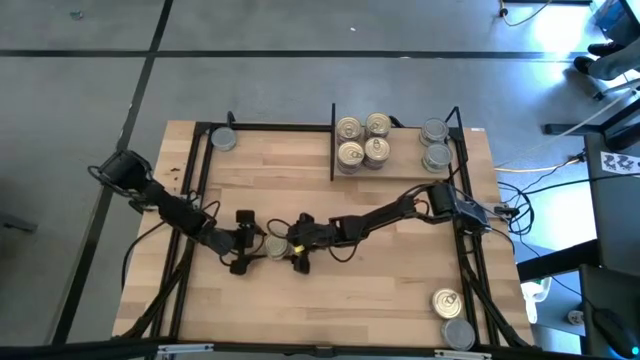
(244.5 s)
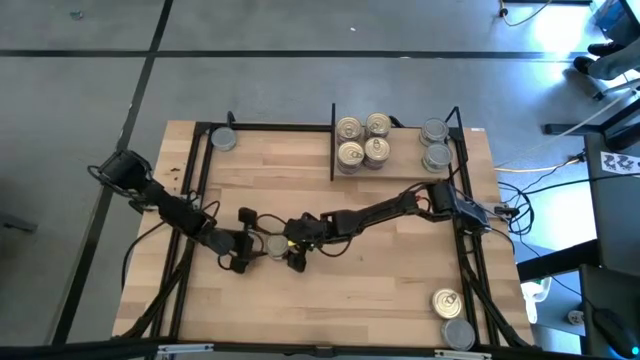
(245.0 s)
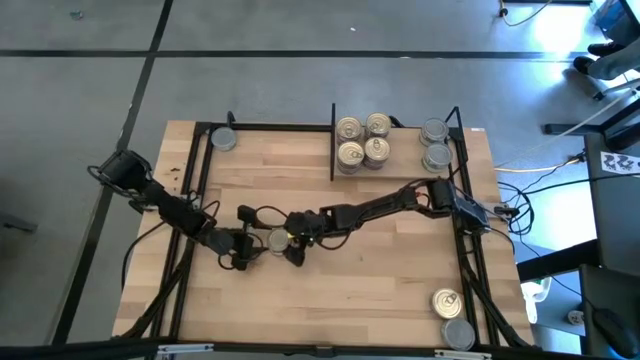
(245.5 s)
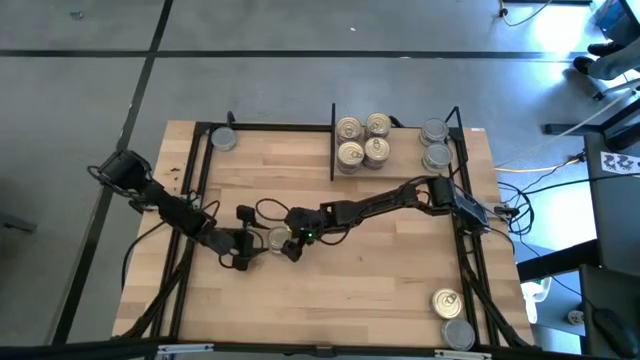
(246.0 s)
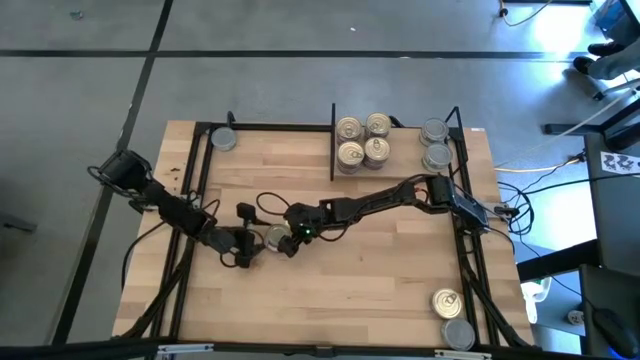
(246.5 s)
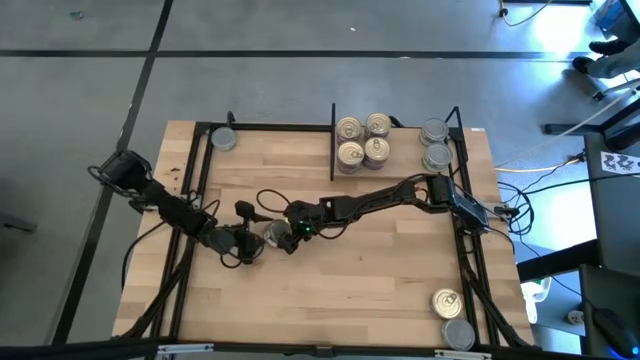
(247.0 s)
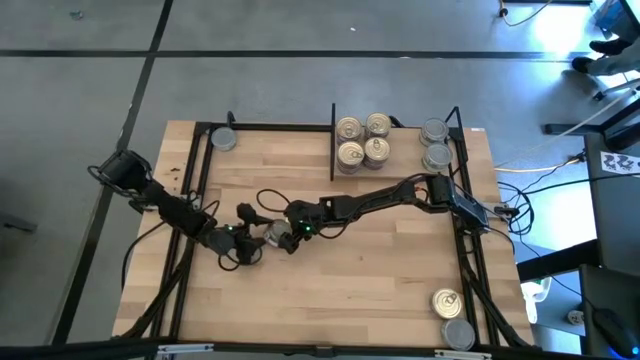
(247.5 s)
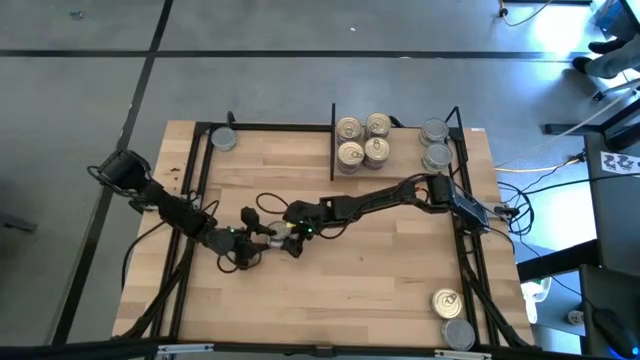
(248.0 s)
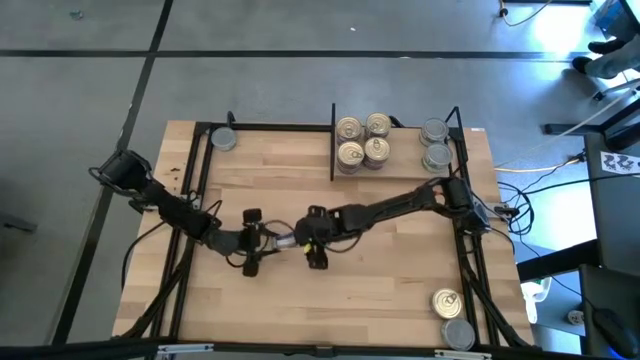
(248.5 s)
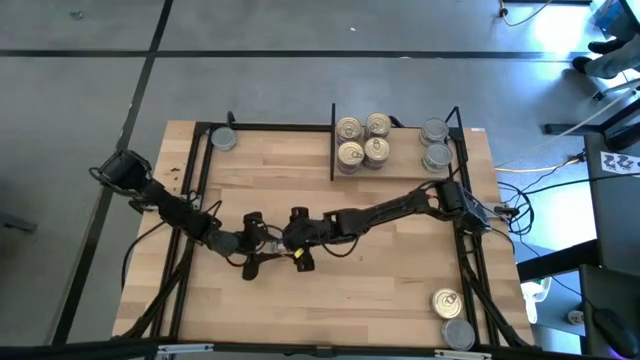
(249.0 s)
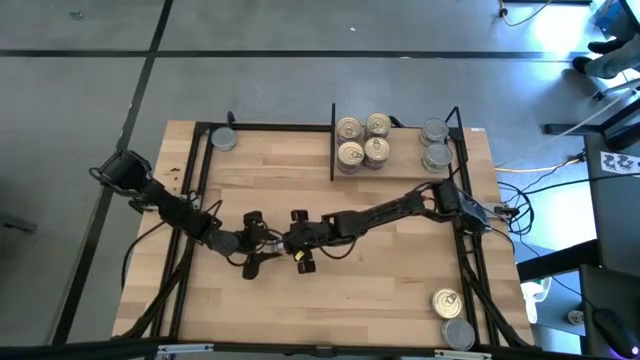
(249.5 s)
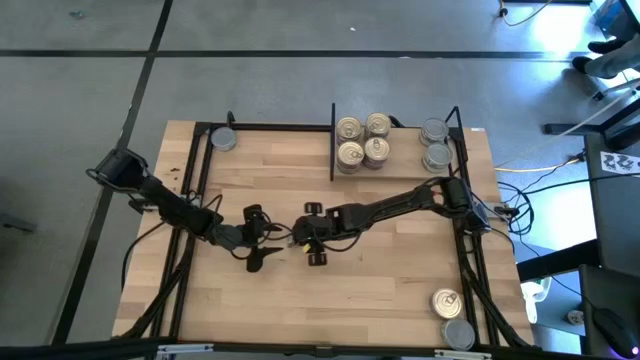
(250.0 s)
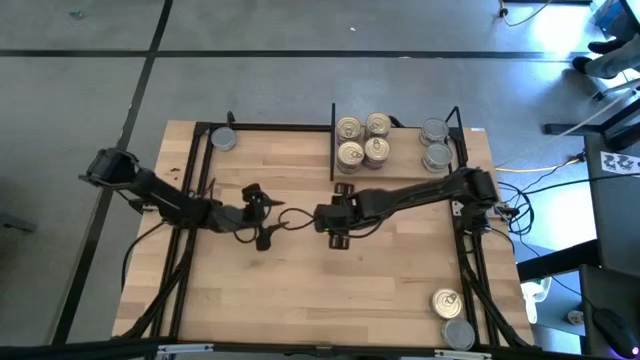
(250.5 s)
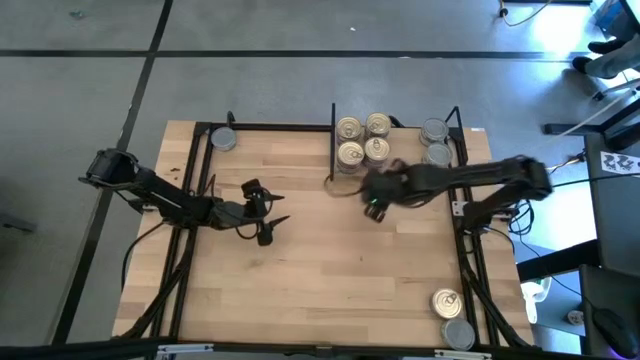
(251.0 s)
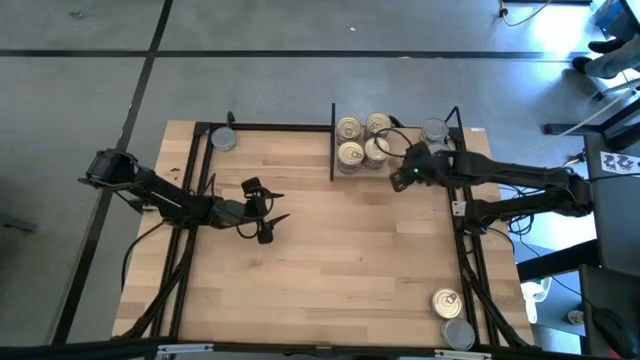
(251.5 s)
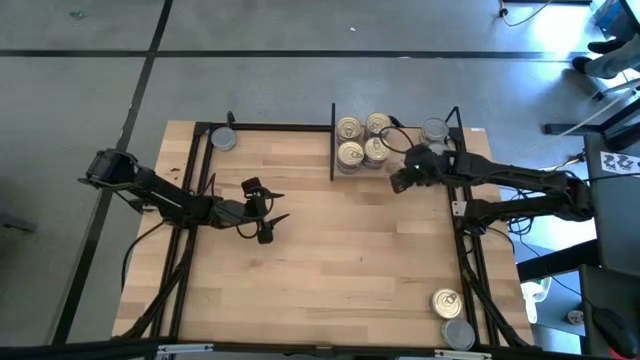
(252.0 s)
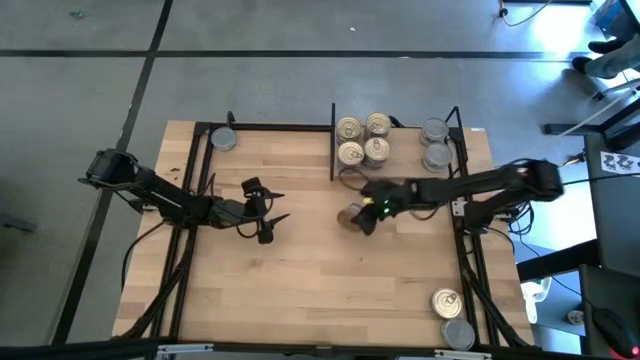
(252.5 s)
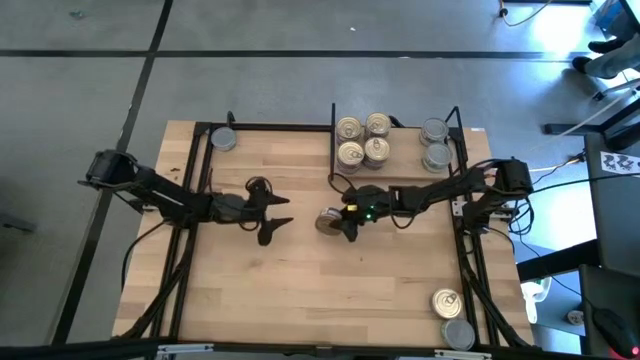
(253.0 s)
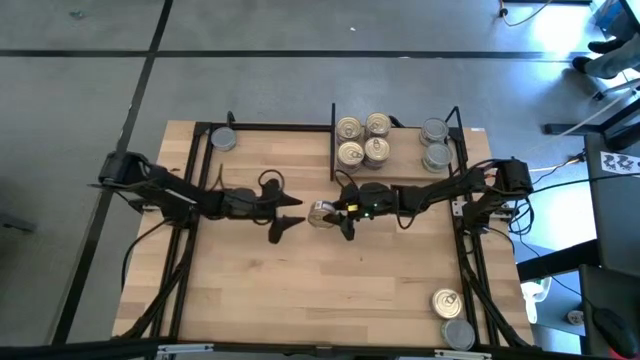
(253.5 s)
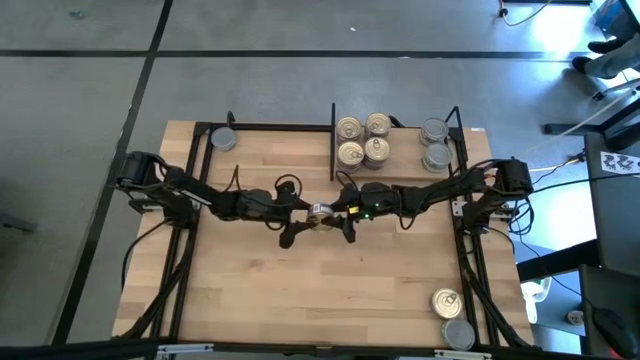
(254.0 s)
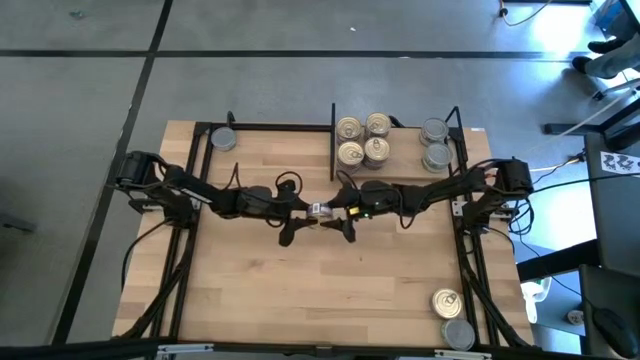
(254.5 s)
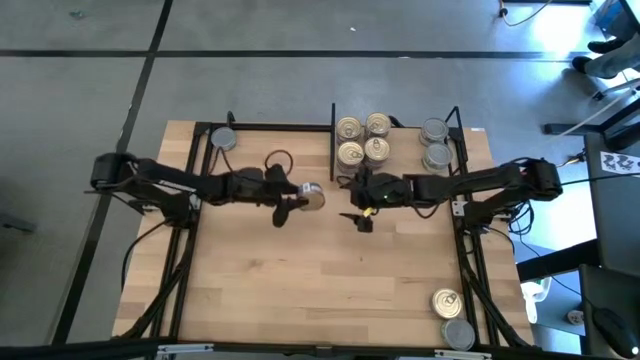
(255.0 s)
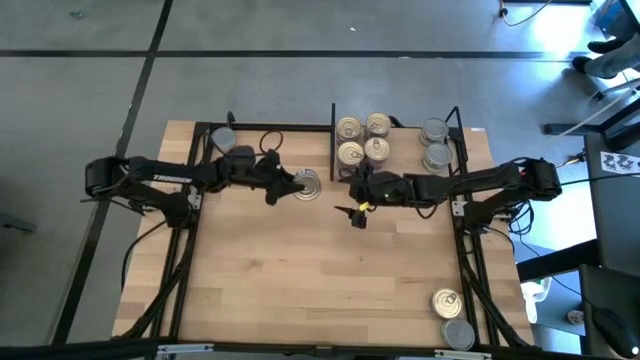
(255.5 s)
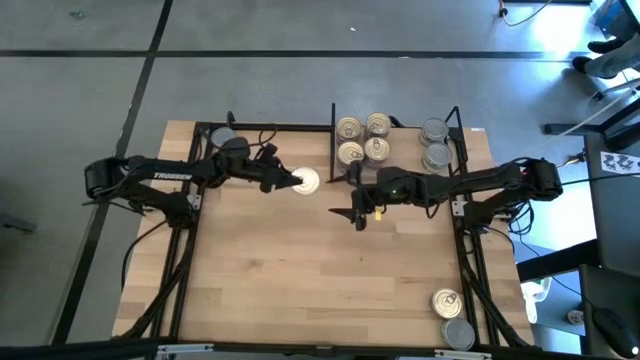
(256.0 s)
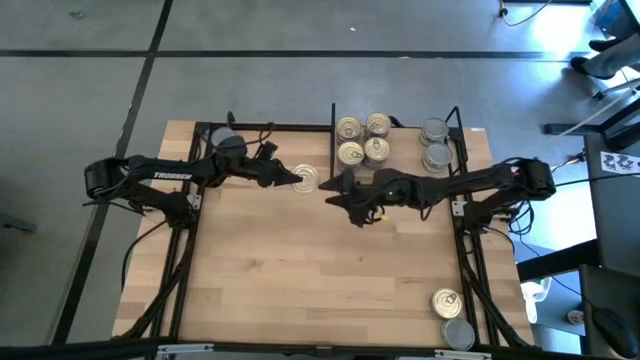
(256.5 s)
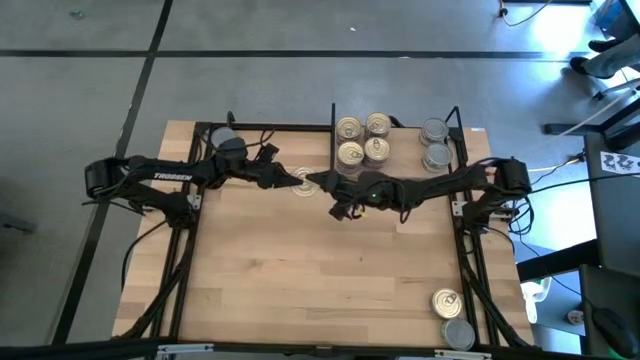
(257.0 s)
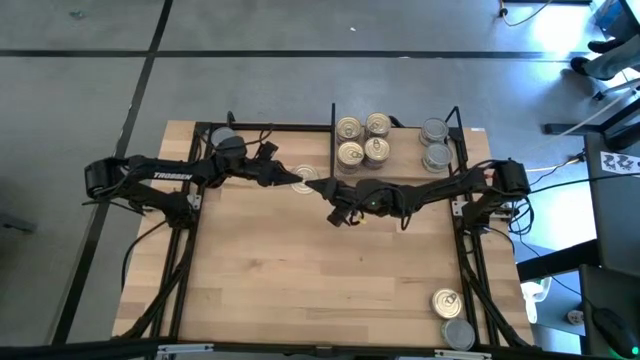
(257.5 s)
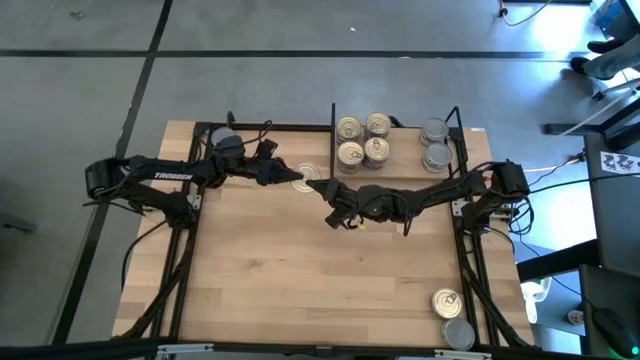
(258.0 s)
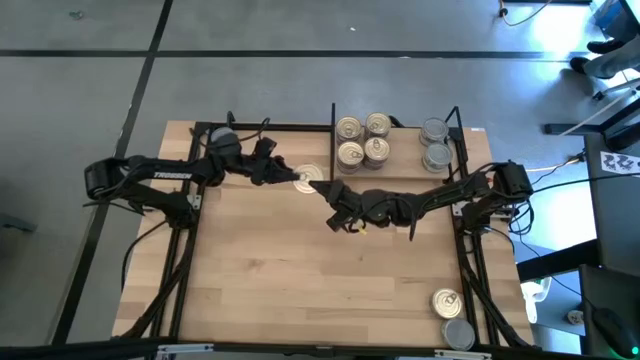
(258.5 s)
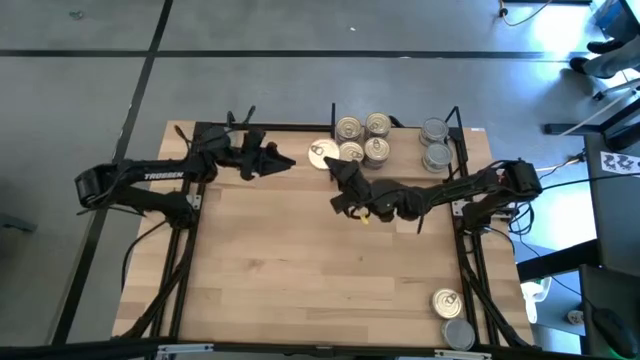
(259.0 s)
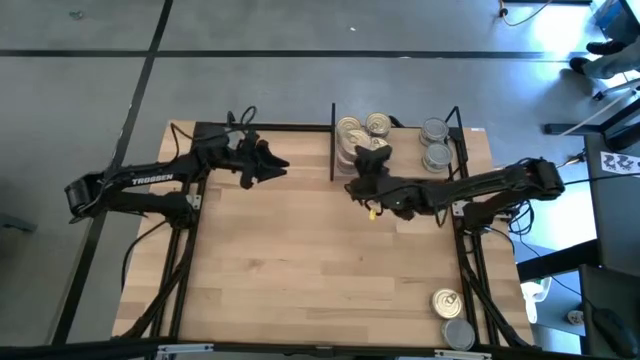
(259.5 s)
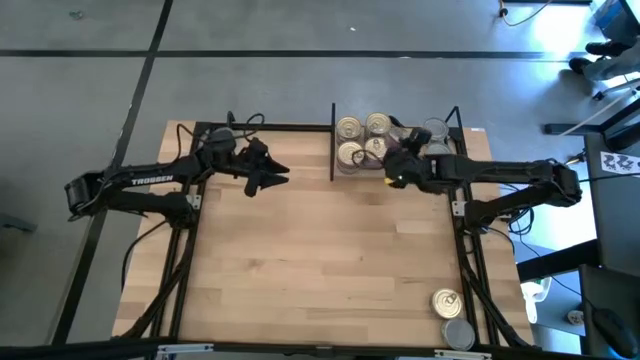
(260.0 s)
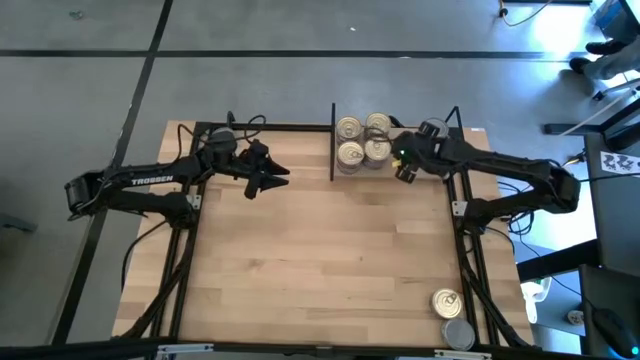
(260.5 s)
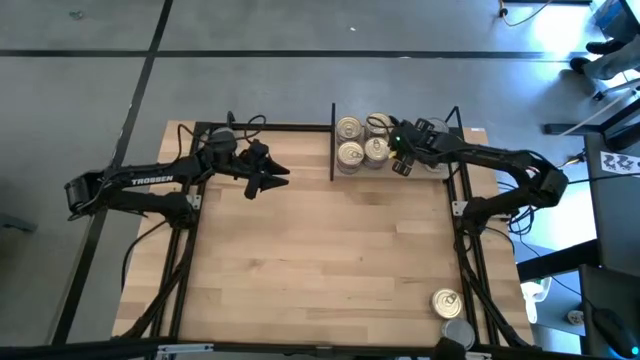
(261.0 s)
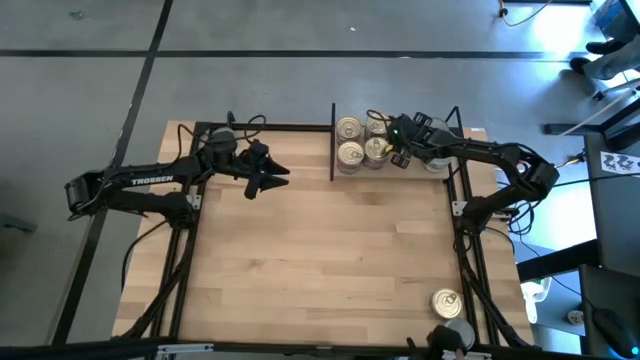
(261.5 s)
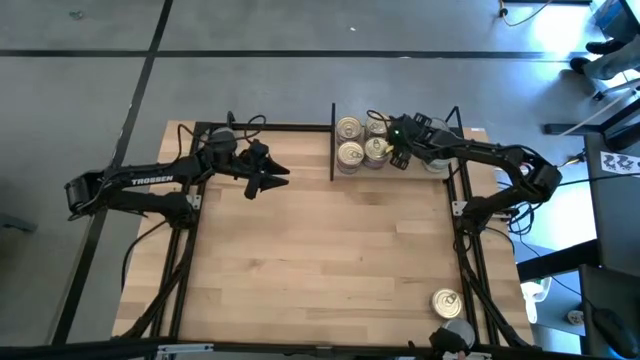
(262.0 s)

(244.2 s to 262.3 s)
Task: Stack canned seafood by type on shelf
Put the blue tuna can on the shelf

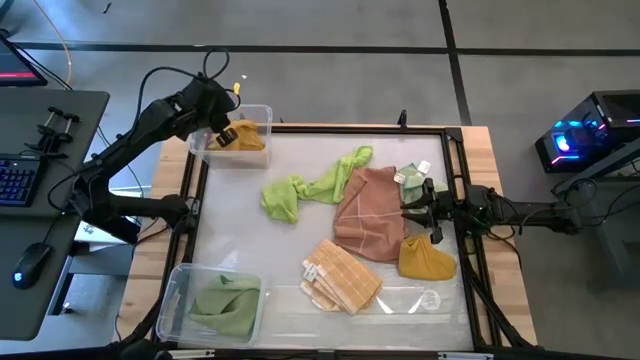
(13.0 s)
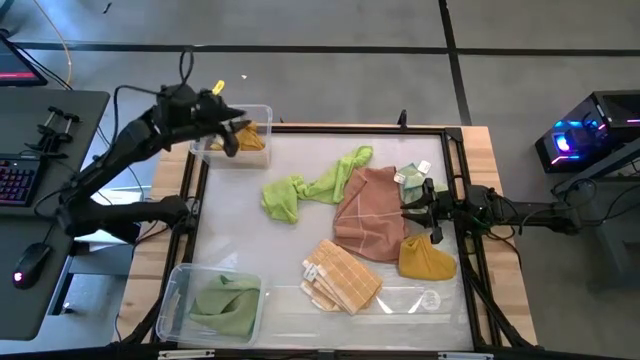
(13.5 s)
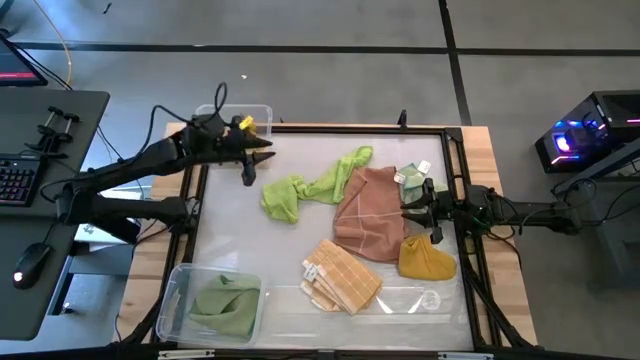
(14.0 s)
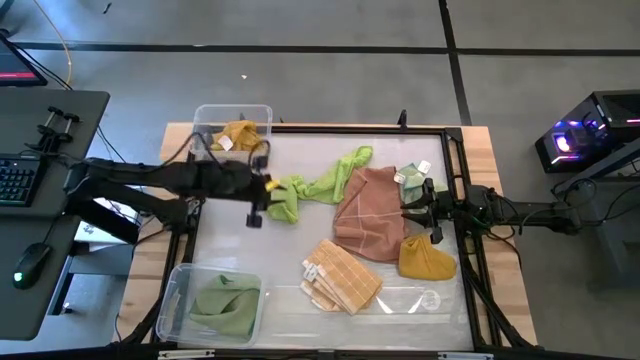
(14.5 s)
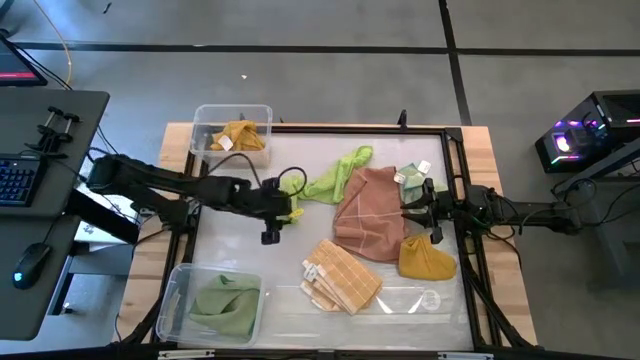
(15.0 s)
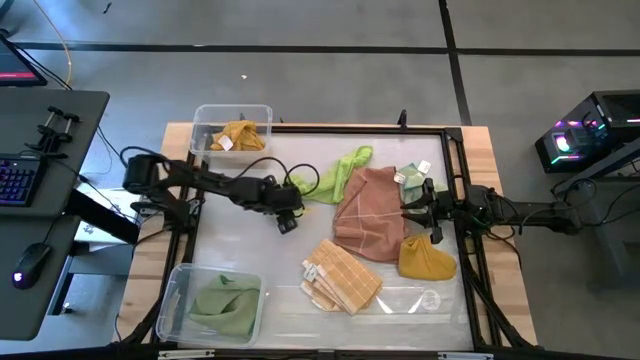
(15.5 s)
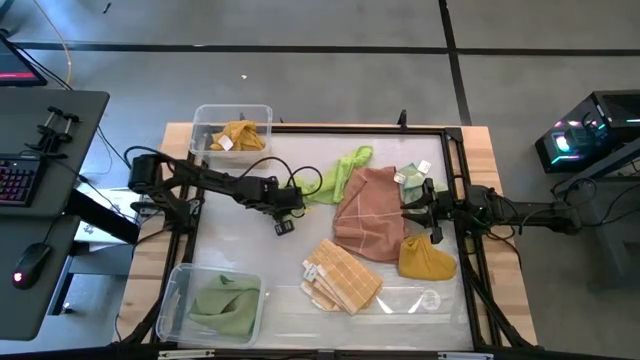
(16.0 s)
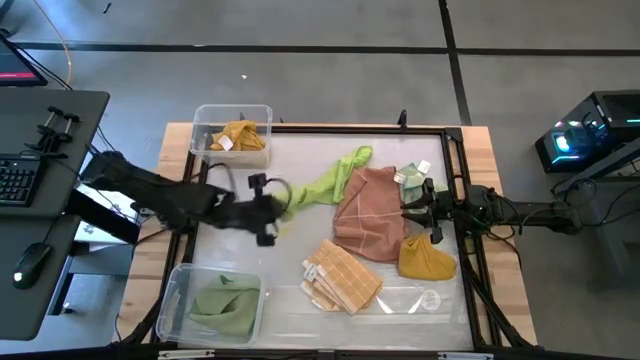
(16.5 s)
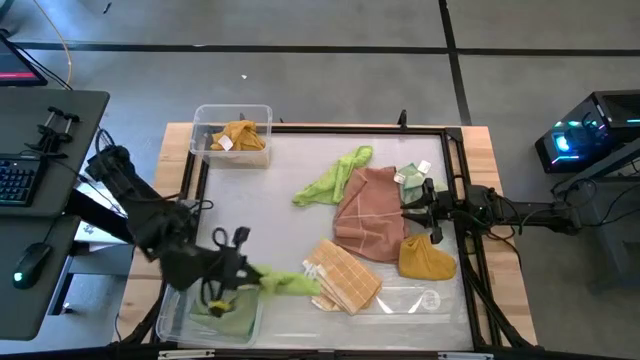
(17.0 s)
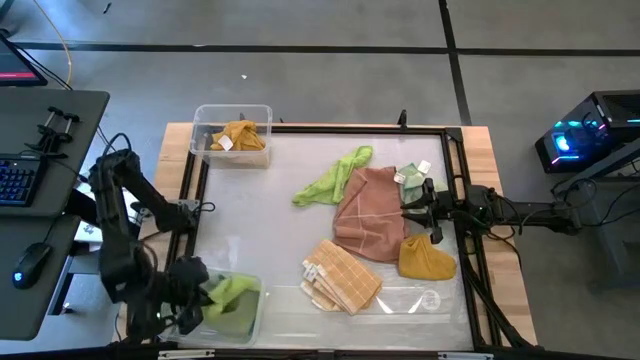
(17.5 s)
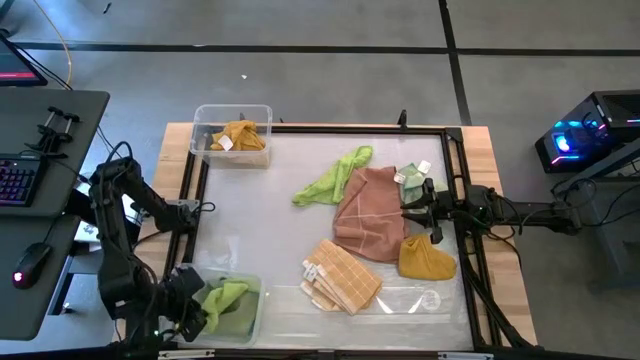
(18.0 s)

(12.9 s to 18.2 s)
Task: Sort towels by color in basket
Put the light green towel into the bottom transparent bin
